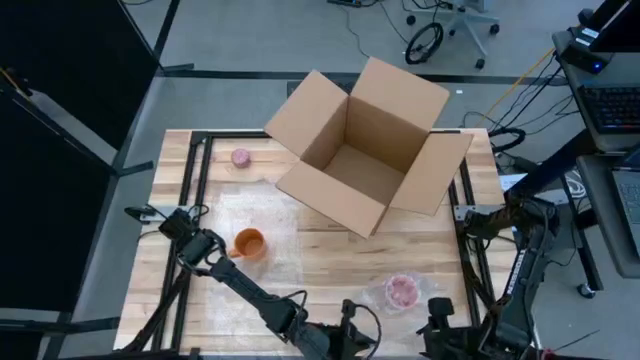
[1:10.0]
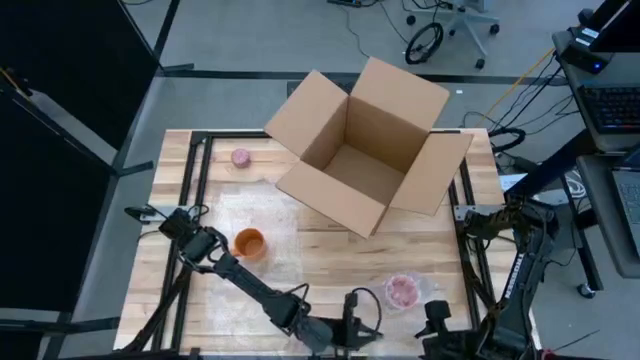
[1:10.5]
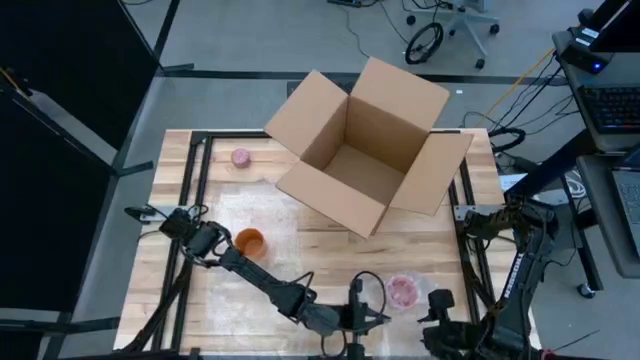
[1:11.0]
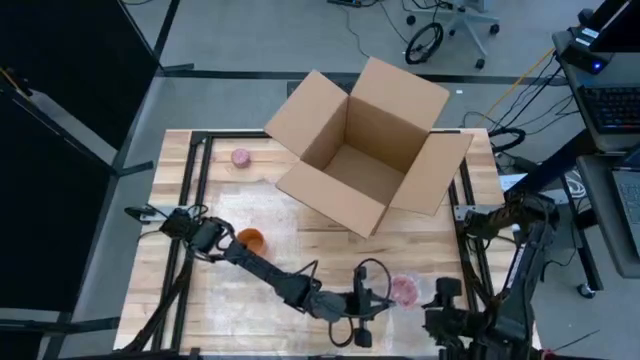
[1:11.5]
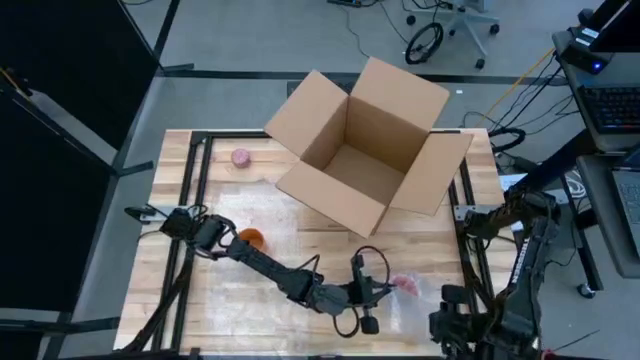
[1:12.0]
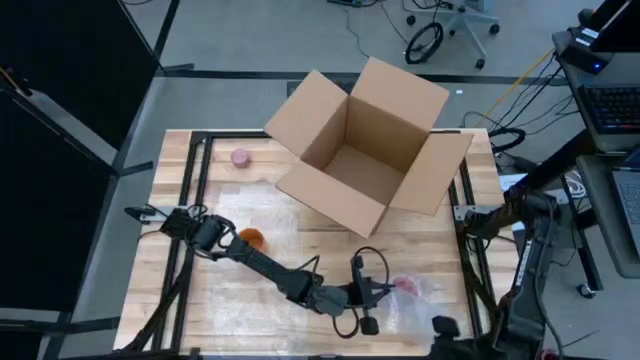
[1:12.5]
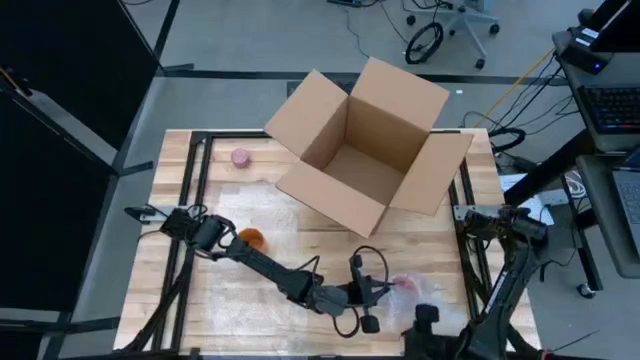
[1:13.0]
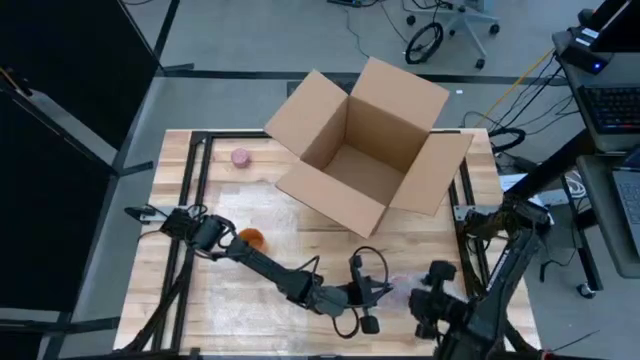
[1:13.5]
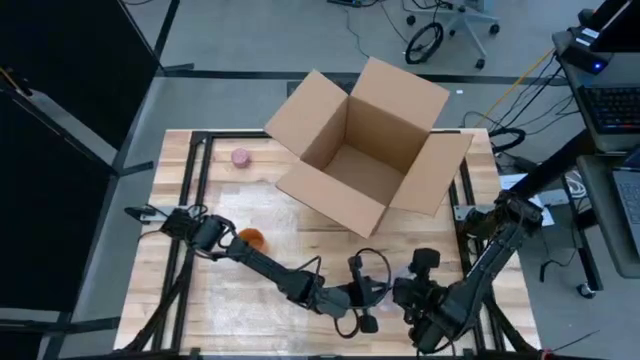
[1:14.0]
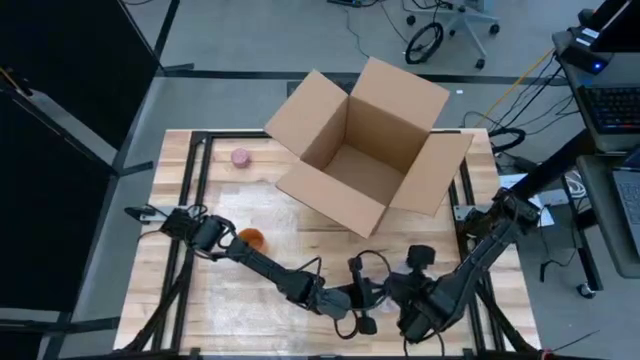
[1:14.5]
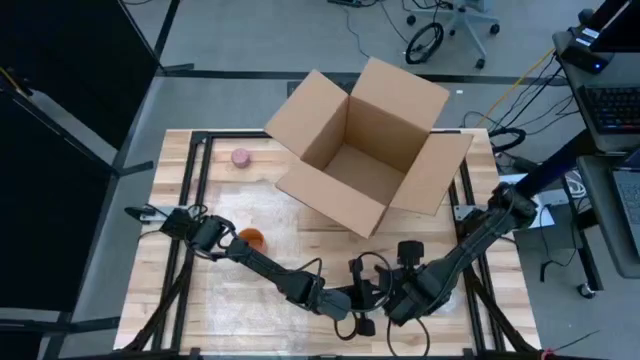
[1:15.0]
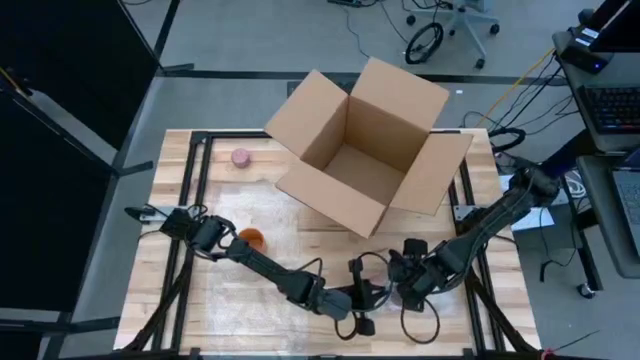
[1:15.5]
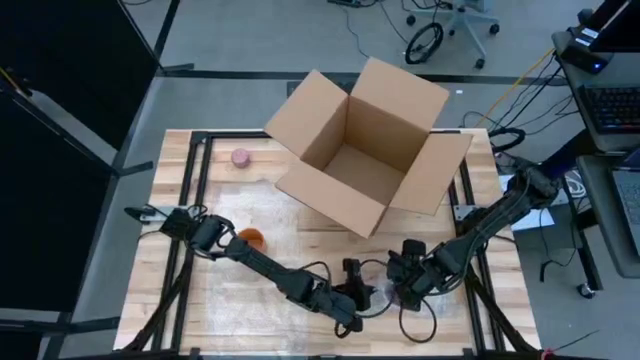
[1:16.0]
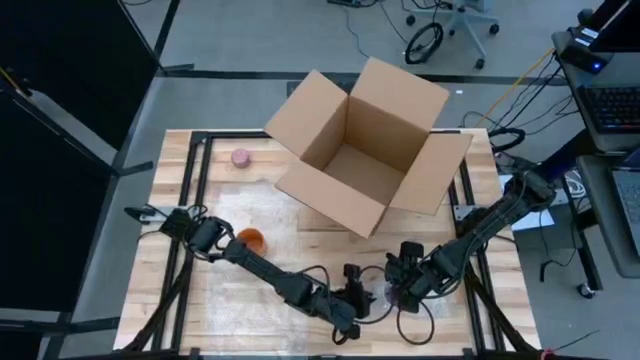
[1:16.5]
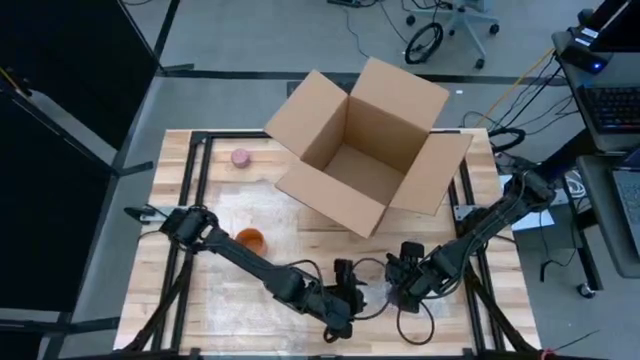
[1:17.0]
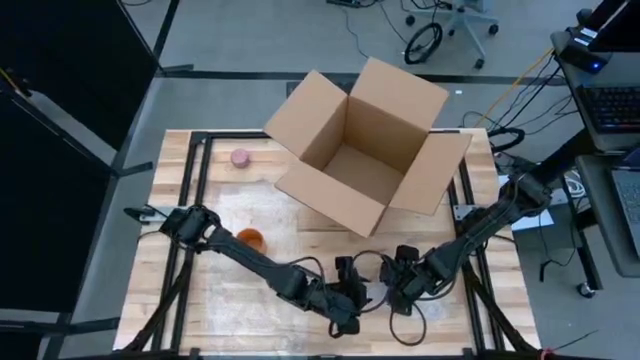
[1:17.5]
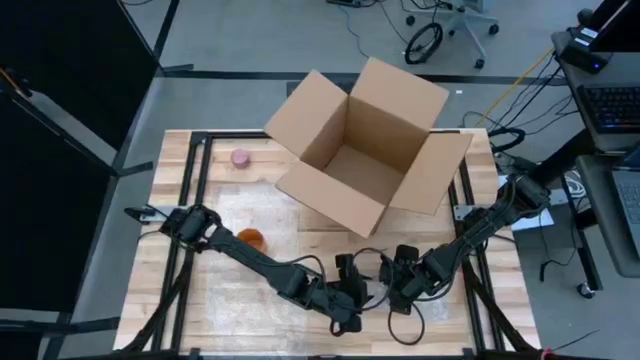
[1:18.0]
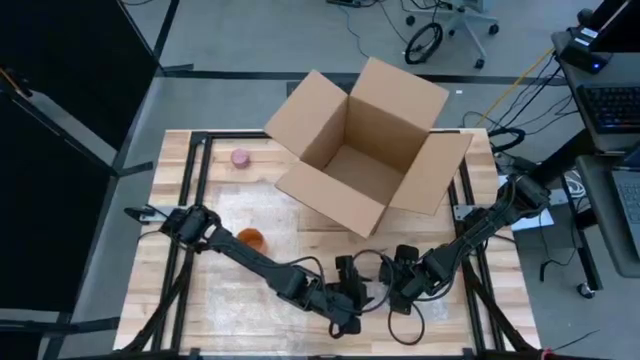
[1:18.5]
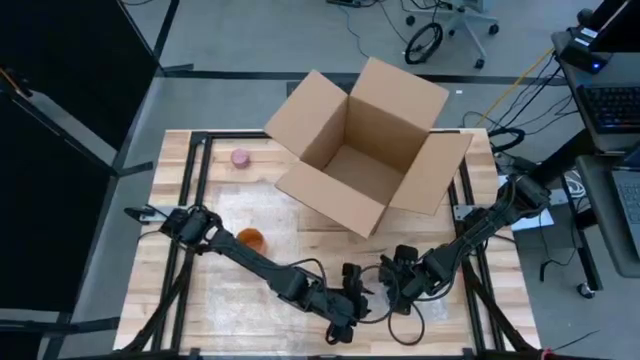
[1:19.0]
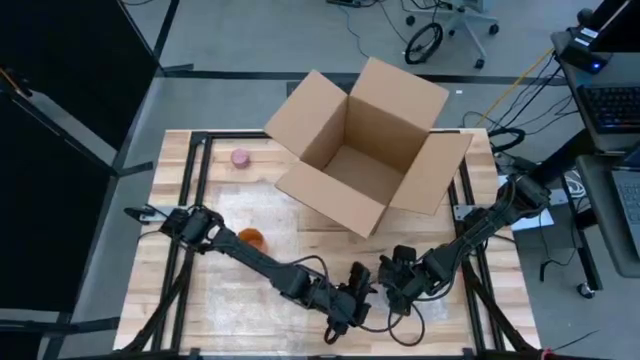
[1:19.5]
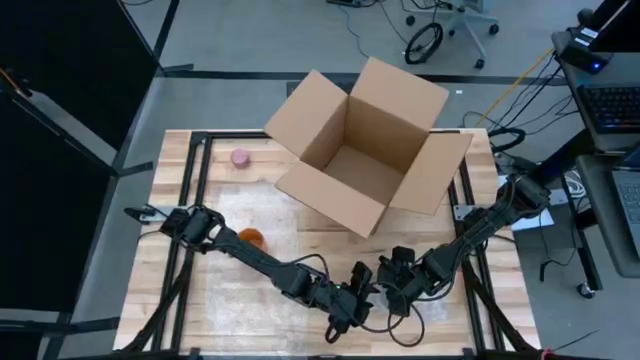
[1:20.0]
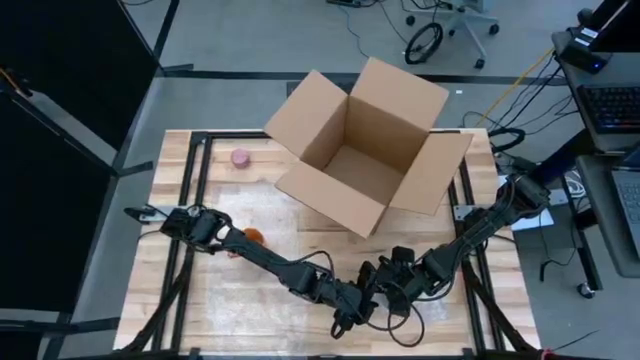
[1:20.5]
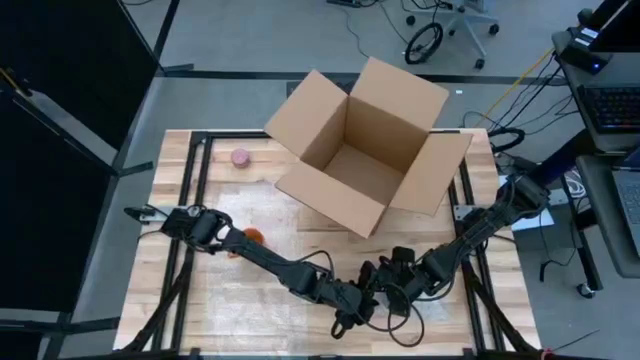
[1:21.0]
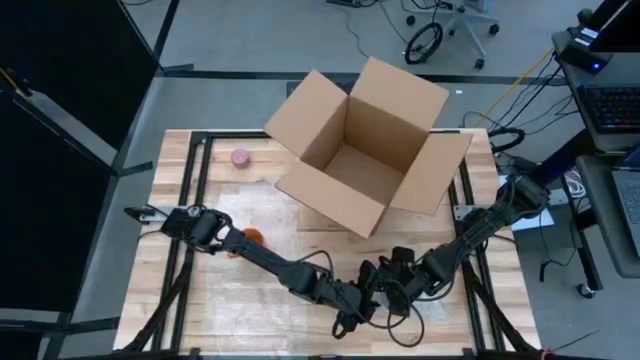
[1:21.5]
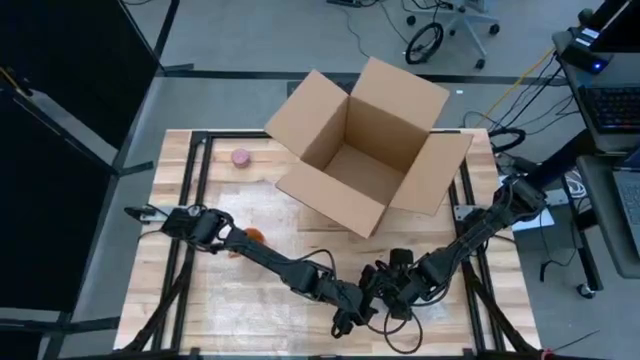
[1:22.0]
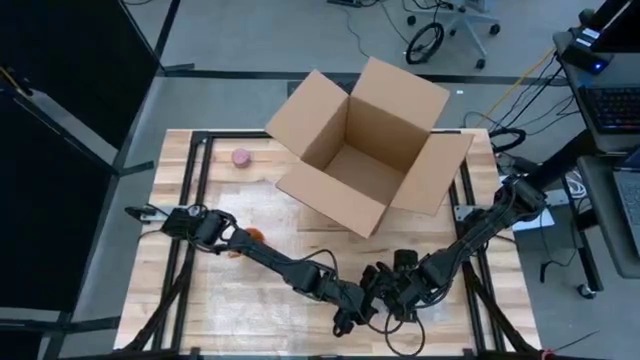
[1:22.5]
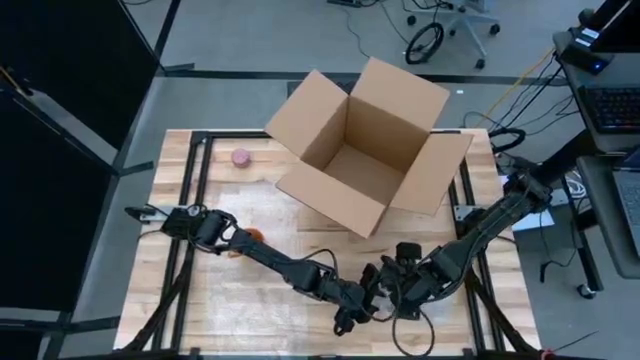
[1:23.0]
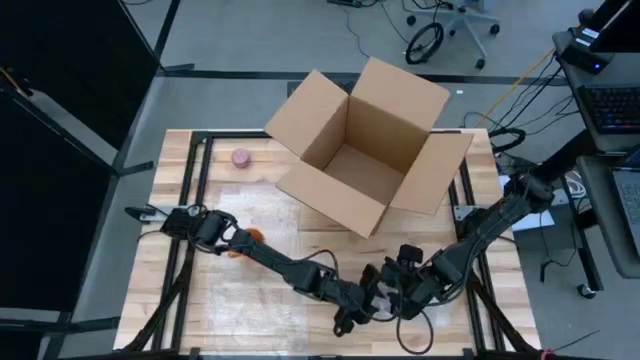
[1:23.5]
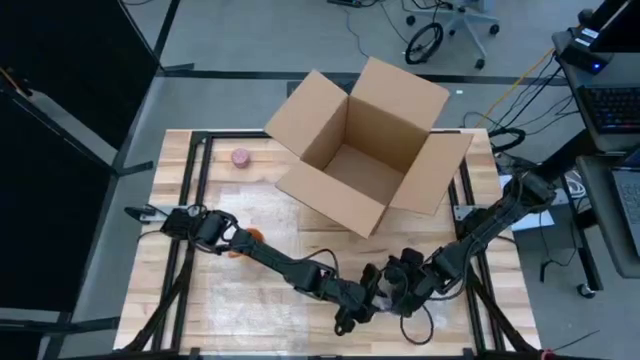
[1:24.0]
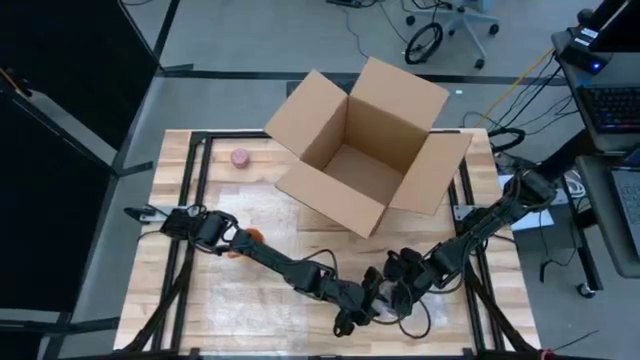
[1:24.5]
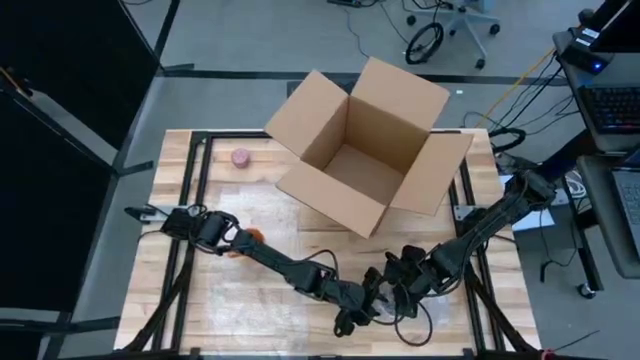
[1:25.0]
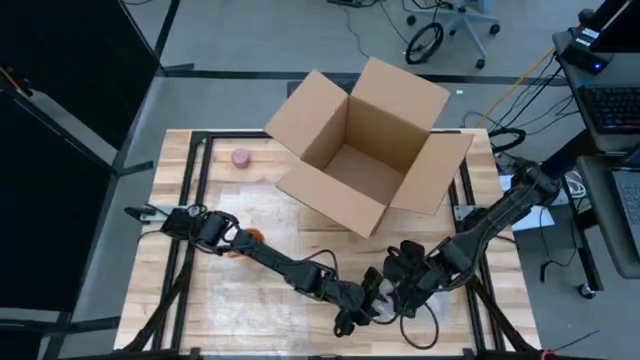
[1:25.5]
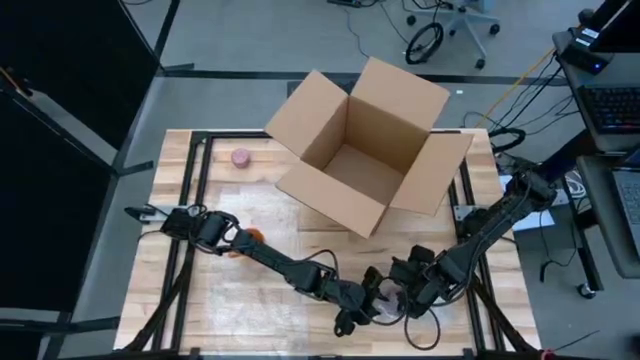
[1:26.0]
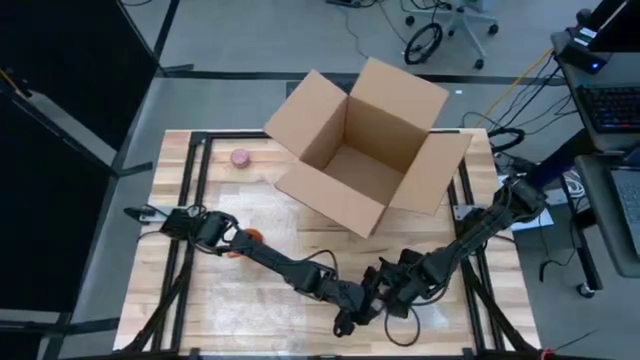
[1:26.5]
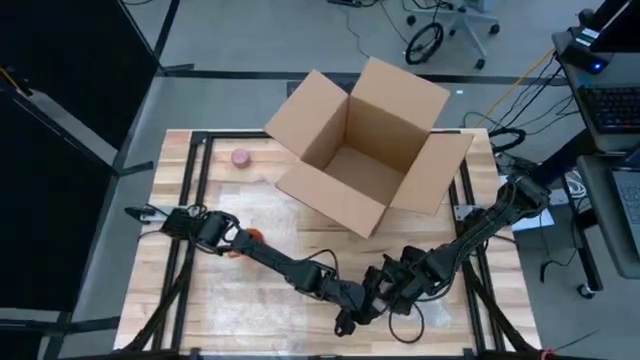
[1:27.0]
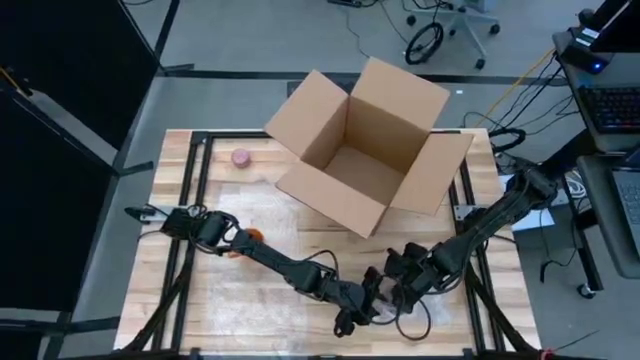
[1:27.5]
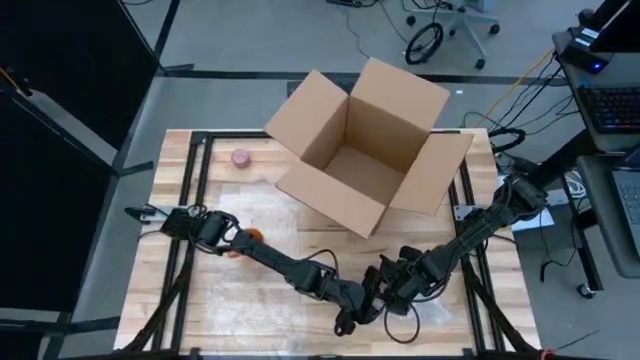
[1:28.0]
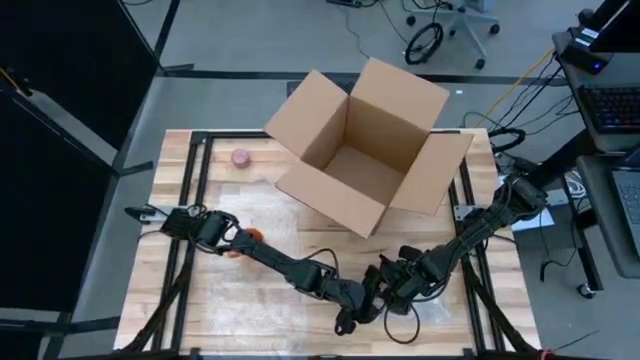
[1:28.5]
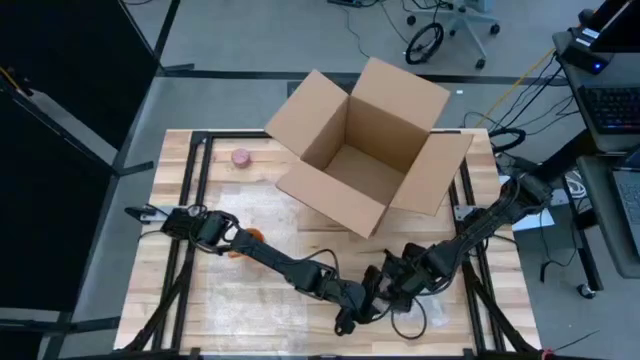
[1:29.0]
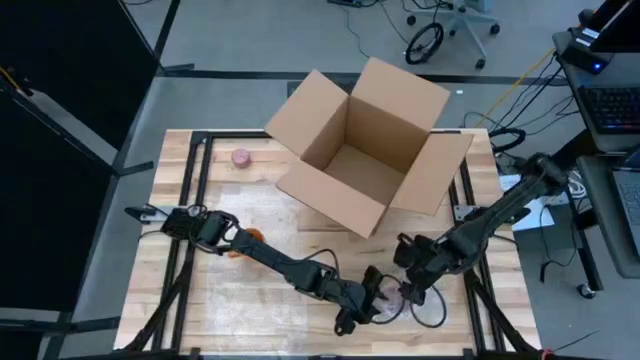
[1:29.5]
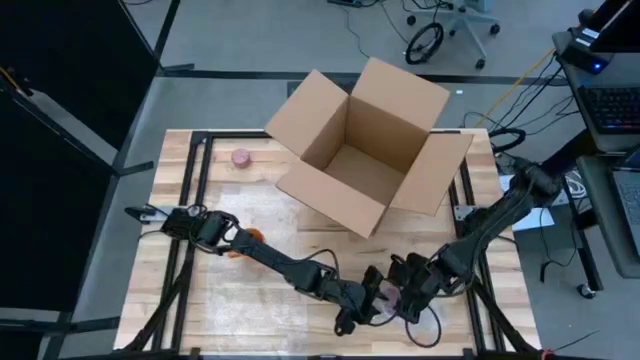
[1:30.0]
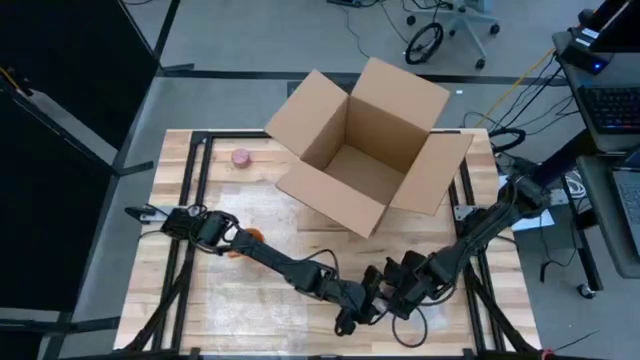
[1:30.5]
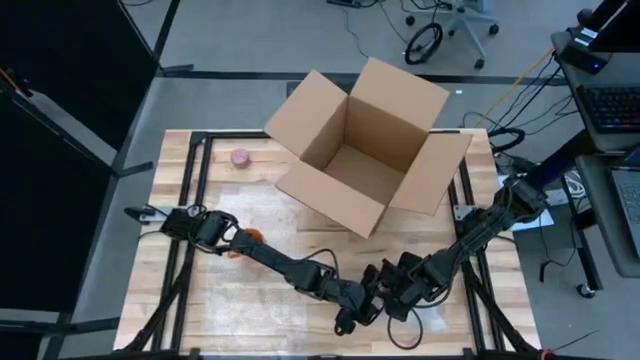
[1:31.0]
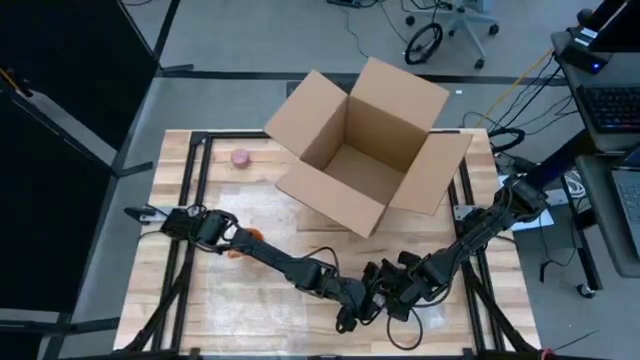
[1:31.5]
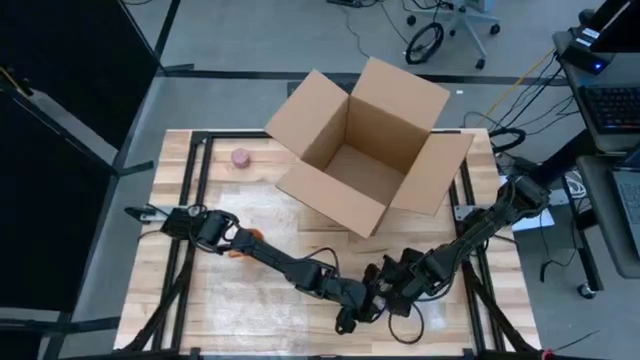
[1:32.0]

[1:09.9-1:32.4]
Task: wrap mug
Wrap the pink mug in the bubble wrap
